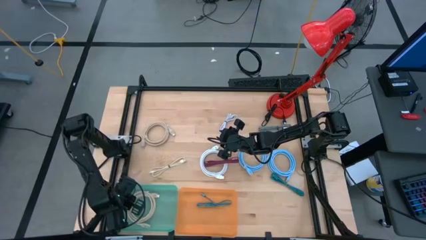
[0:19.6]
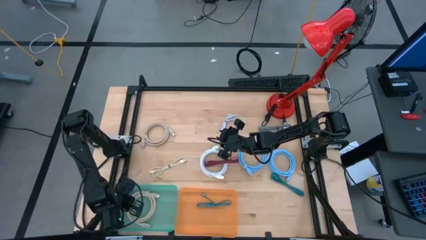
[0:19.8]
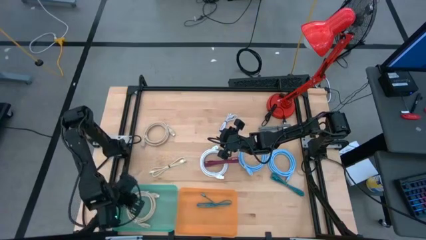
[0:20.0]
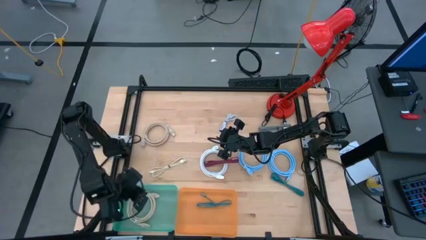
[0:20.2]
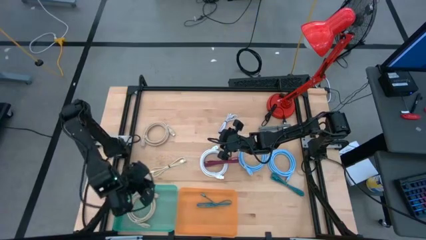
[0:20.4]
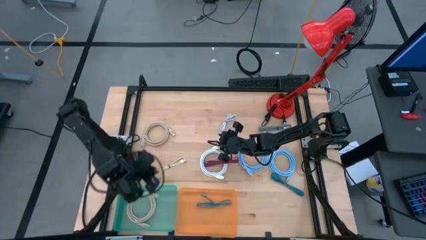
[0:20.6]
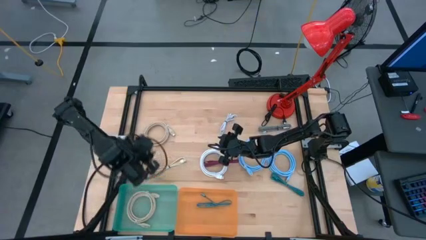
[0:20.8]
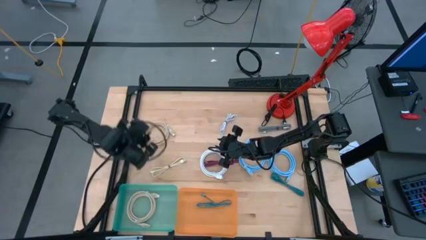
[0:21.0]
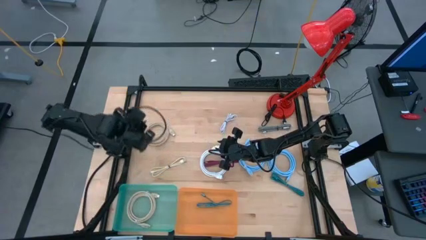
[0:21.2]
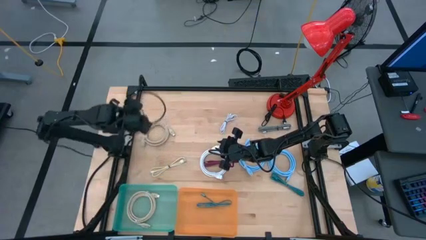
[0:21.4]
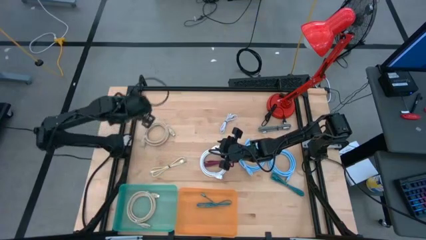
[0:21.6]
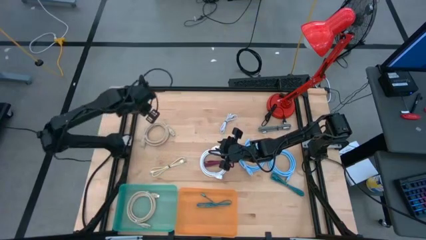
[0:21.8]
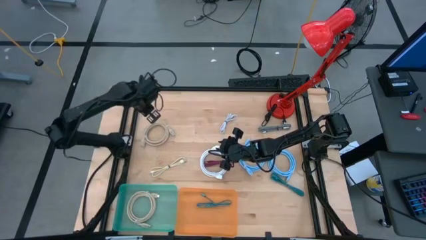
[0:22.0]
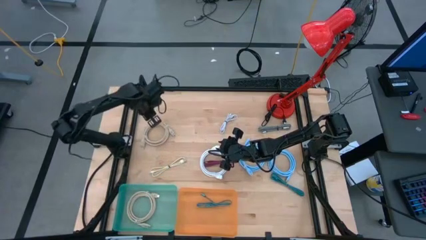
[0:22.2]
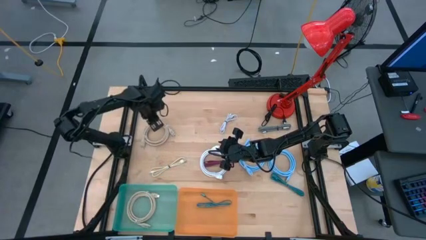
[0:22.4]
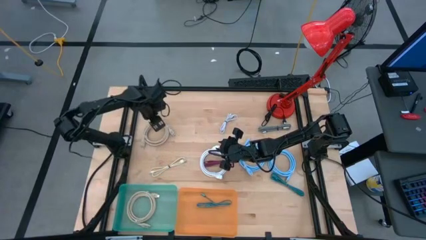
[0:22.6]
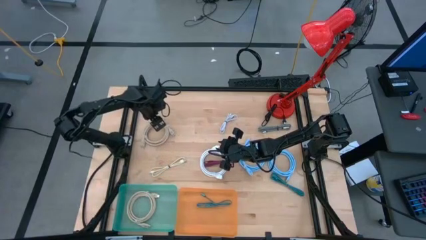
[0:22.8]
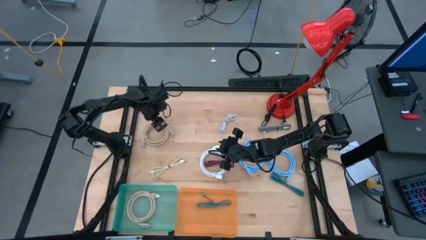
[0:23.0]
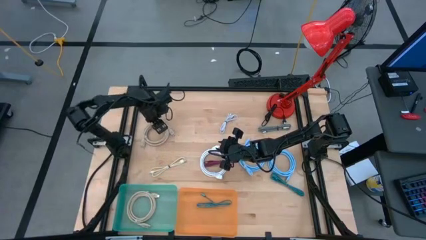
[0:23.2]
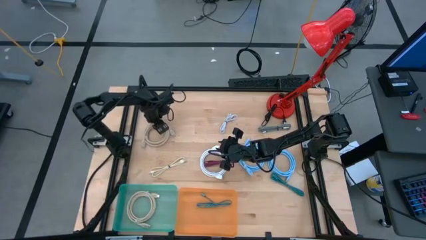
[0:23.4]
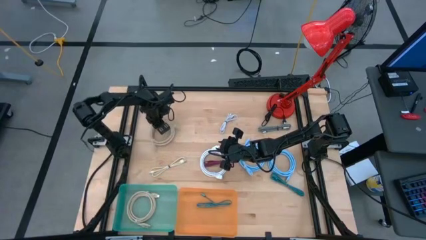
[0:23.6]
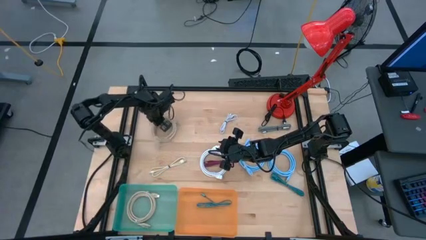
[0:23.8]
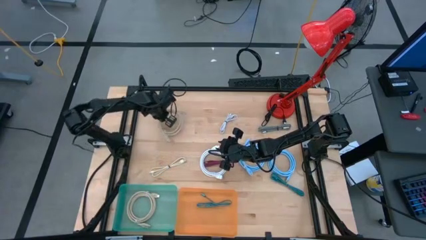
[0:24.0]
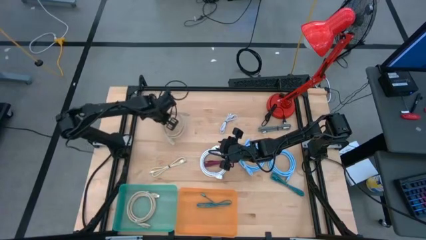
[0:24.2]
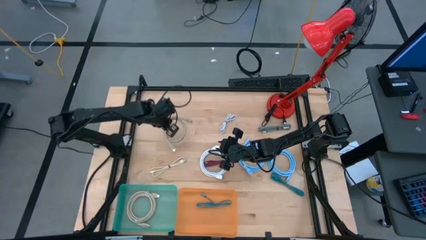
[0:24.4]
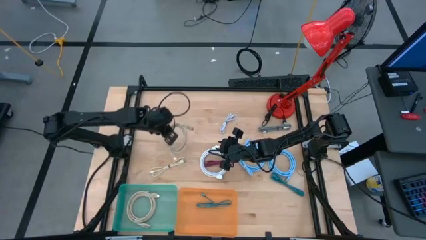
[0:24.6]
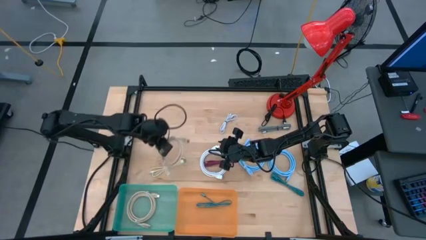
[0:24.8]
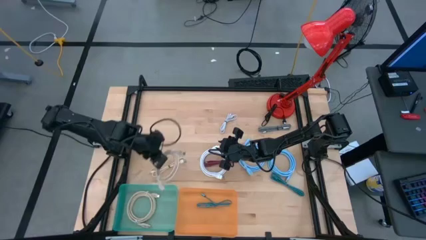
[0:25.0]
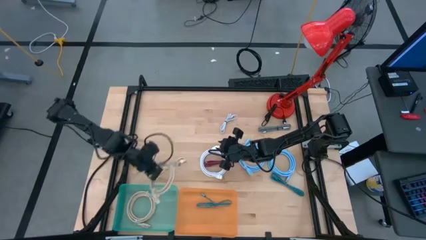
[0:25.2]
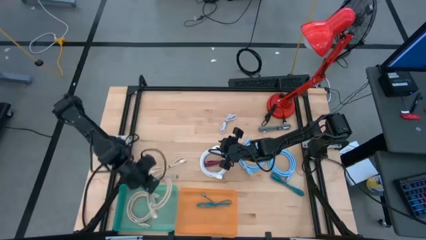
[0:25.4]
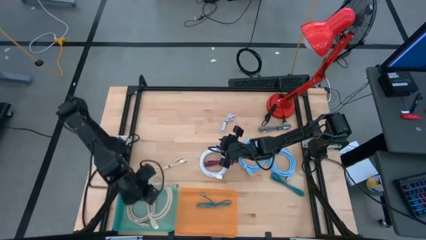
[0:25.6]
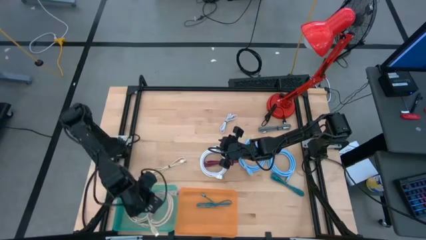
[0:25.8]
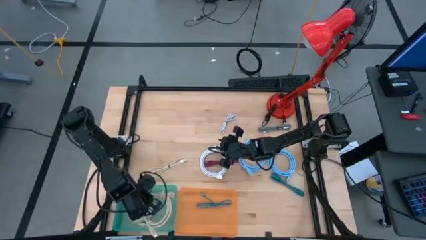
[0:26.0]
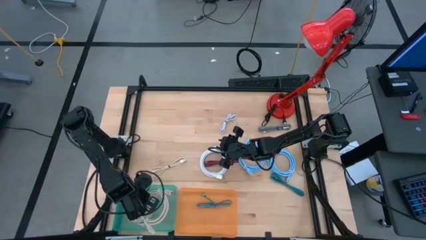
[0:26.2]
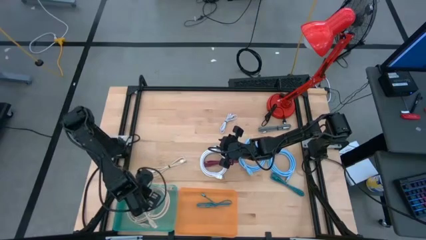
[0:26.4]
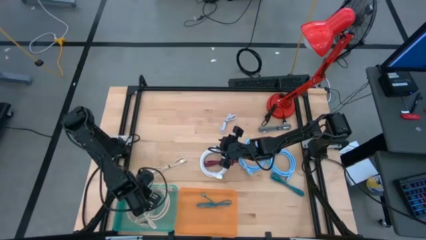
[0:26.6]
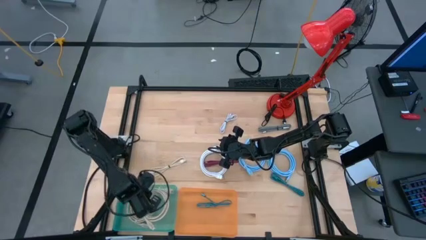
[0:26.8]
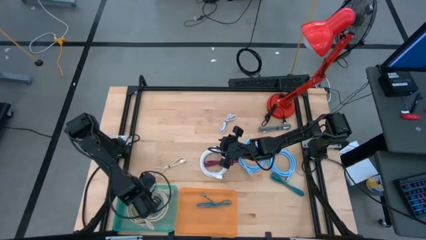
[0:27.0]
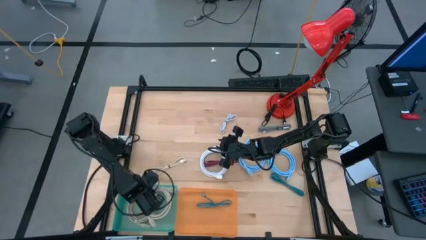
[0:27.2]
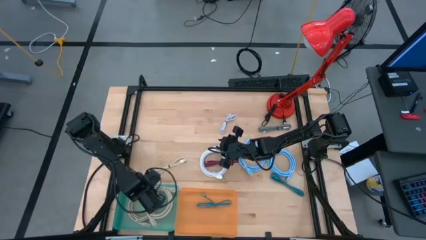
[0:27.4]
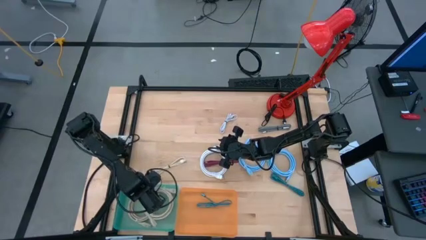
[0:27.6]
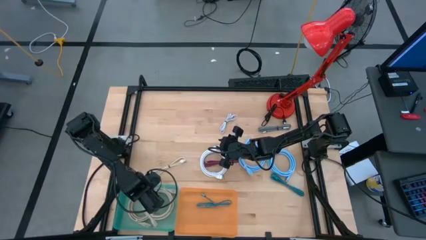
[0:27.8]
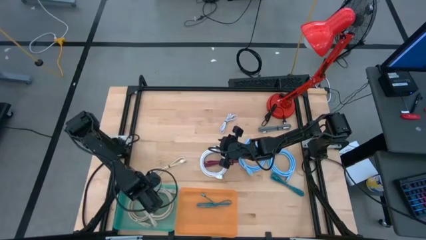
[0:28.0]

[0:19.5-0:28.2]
Task: Pick & Place USB Port
Put the brown HDMI cable into the green bin

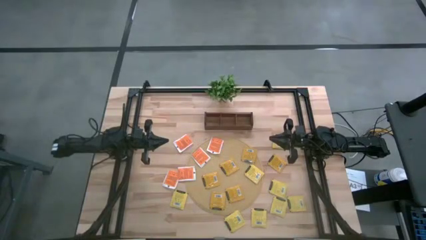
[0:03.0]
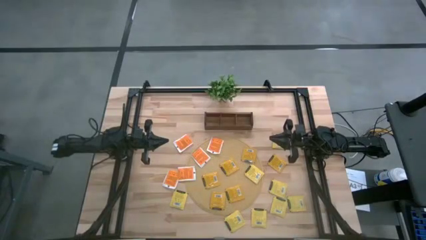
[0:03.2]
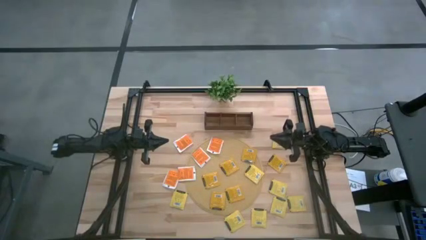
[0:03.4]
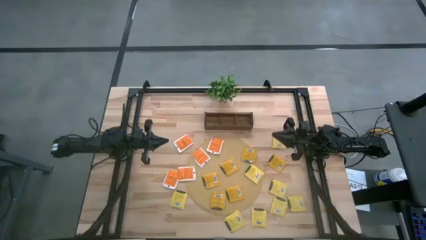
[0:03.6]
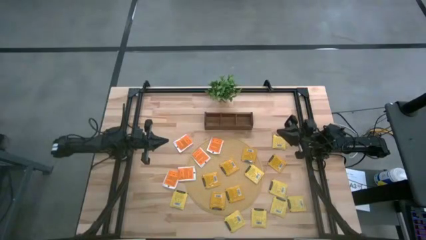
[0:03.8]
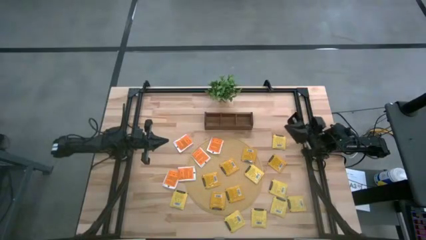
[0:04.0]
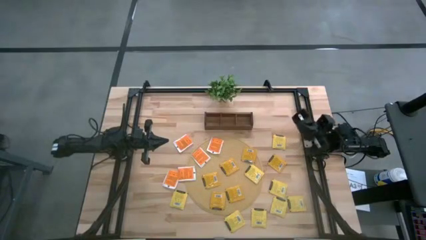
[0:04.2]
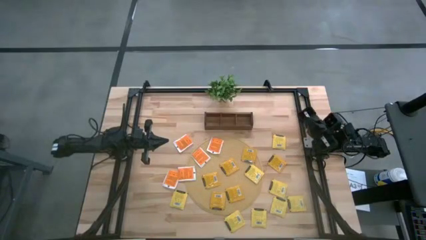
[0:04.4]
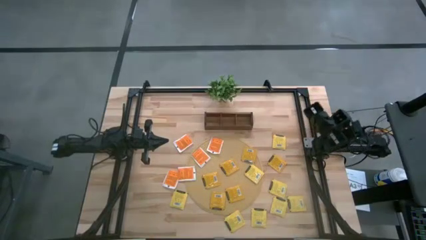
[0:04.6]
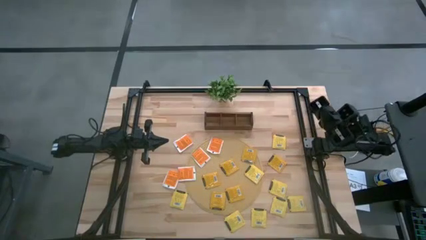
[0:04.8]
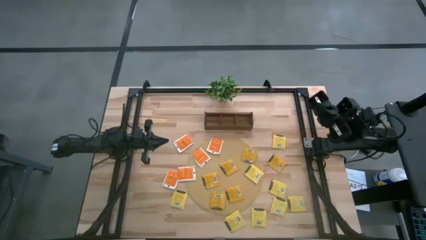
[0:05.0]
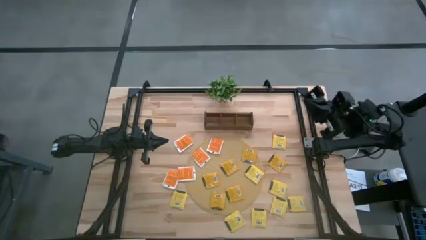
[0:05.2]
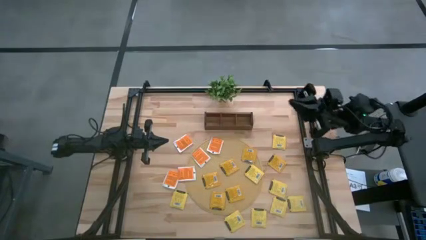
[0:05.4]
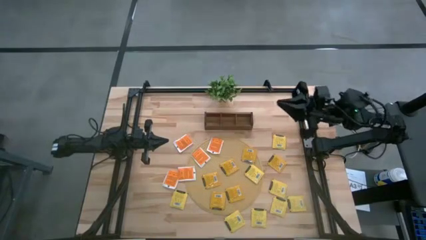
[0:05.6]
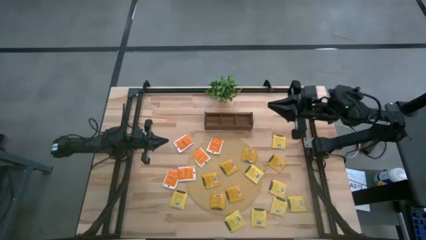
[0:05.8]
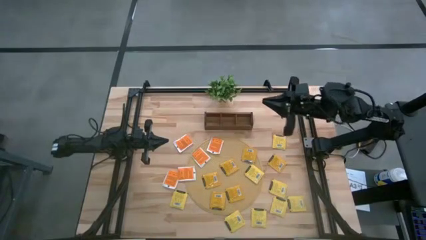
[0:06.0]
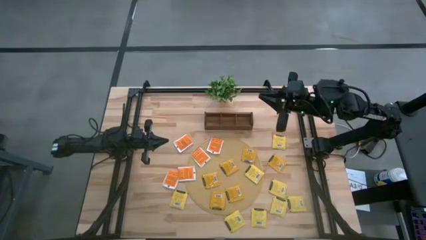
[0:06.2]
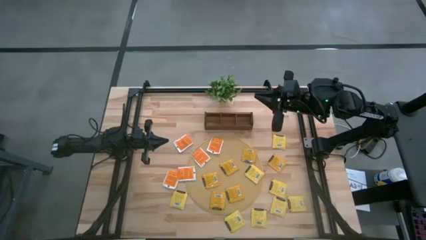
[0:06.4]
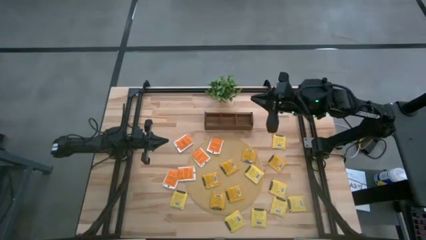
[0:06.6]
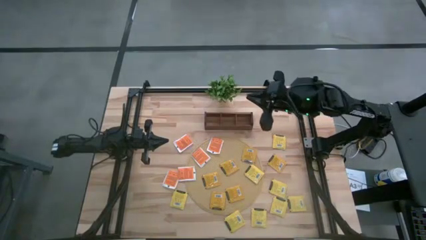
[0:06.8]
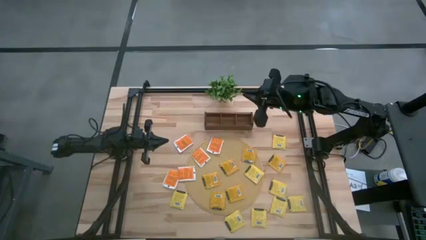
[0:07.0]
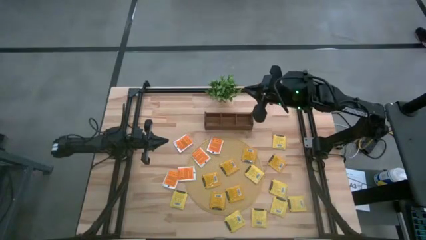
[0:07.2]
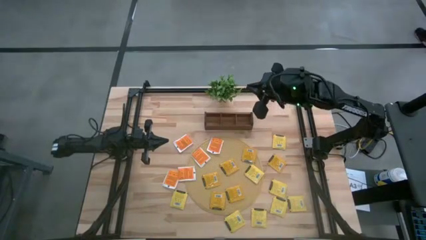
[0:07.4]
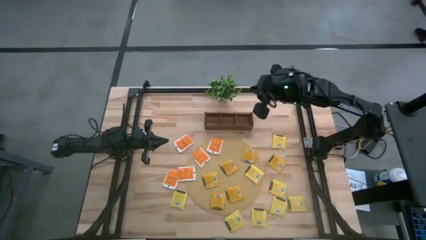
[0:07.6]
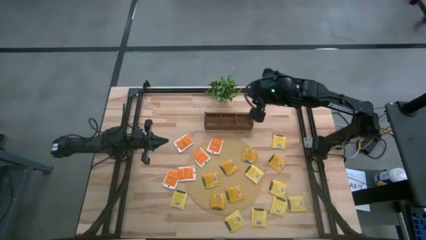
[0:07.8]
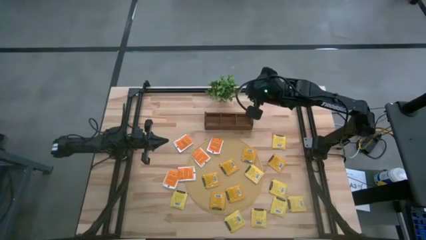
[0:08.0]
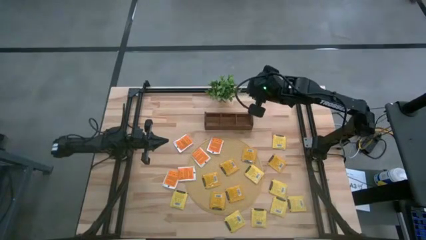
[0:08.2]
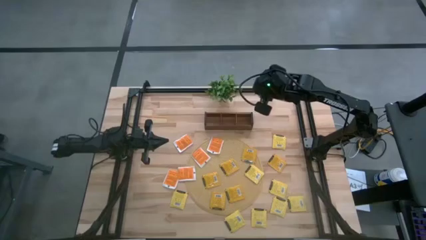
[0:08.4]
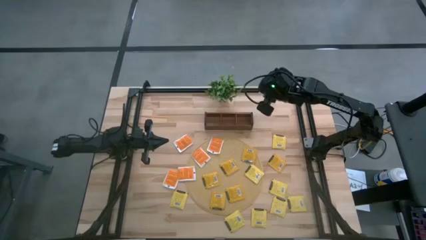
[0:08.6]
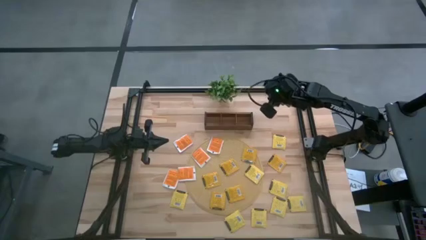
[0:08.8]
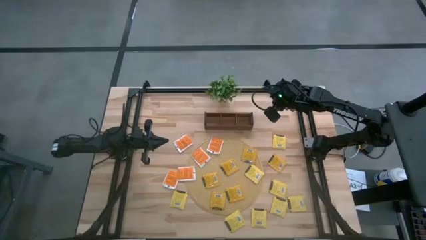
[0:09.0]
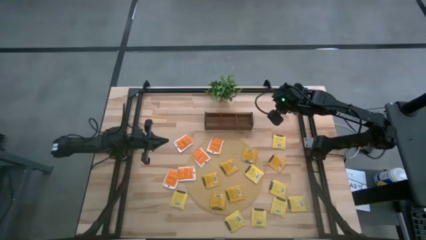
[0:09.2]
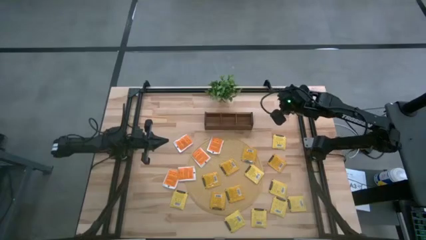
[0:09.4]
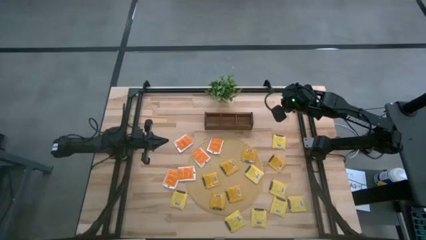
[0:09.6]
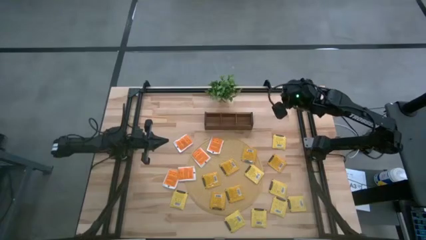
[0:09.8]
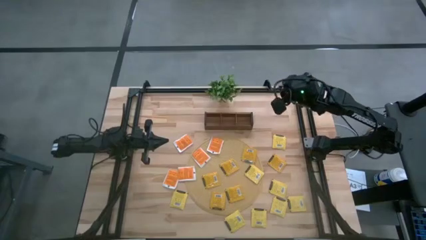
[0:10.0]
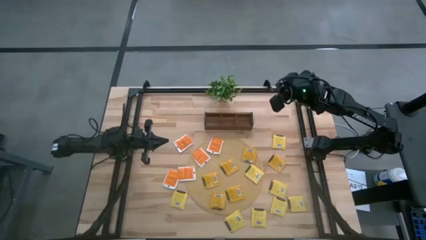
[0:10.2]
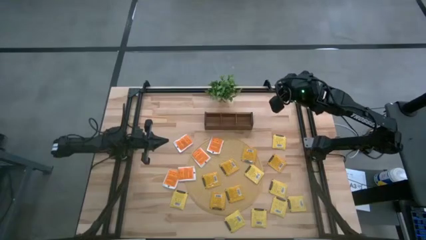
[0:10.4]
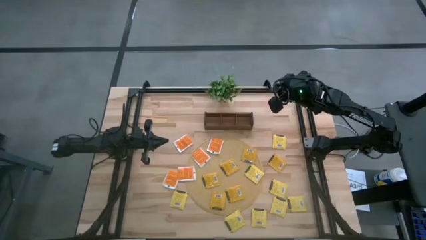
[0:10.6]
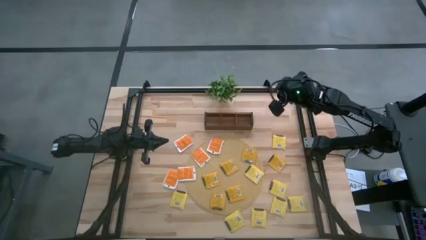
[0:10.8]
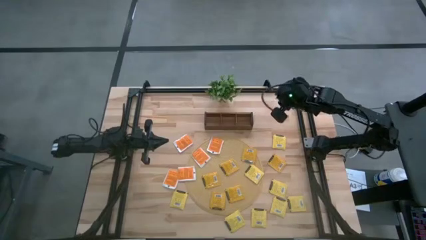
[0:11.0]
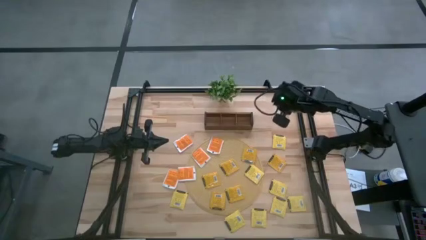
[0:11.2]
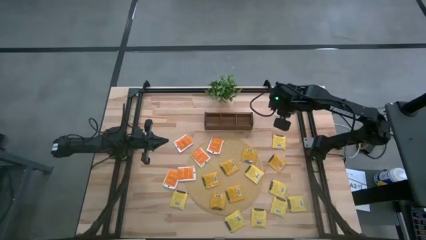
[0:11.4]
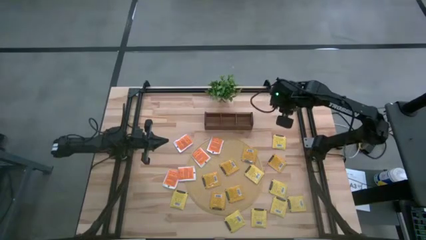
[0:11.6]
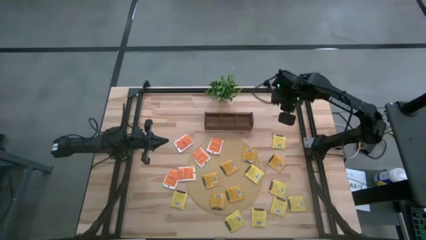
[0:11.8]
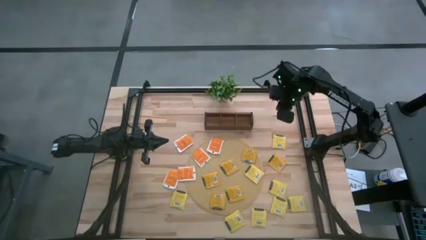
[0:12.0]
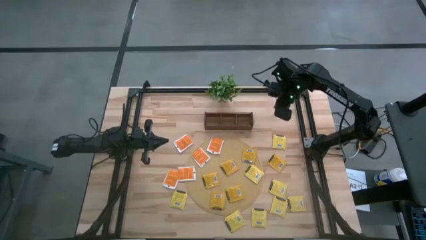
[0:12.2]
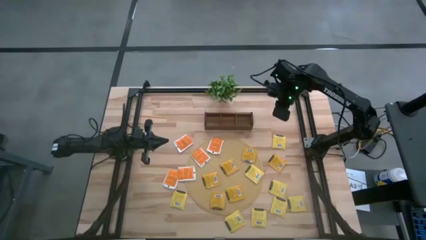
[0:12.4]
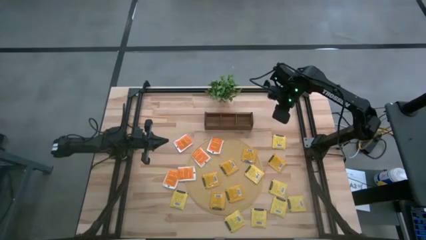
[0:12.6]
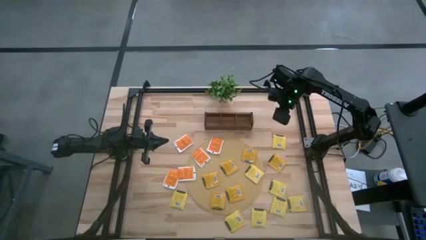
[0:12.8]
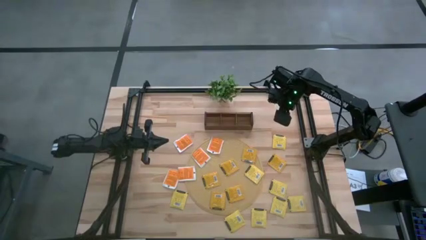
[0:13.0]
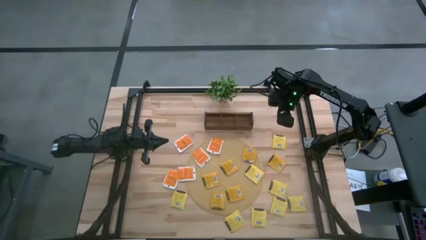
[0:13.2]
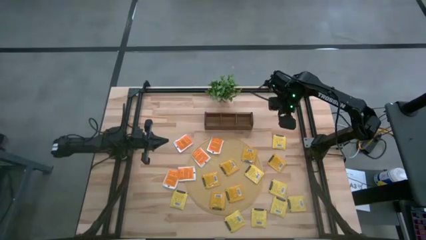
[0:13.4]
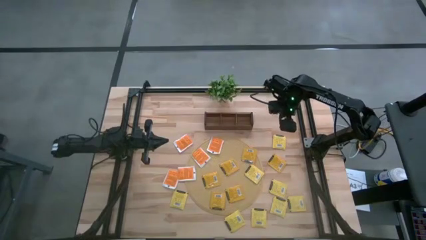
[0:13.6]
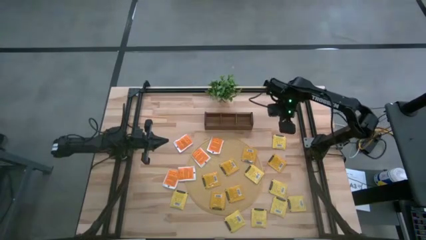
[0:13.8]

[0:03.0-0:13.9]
Task: Pick & Place Tea
Put the yellow tea bag into the right section of the wooden organizer
